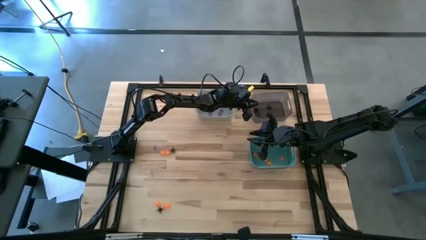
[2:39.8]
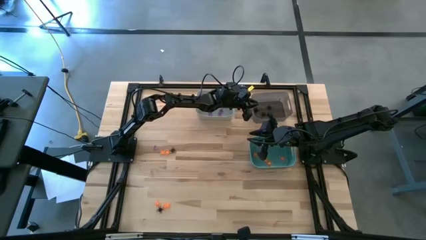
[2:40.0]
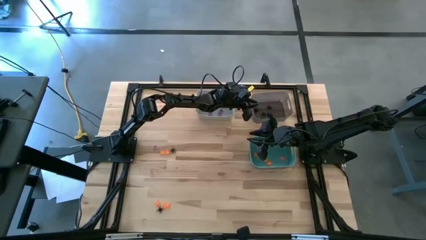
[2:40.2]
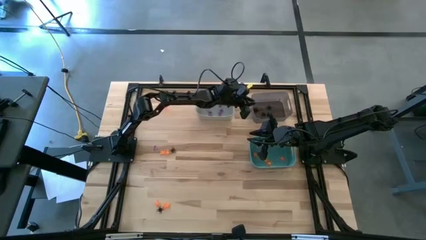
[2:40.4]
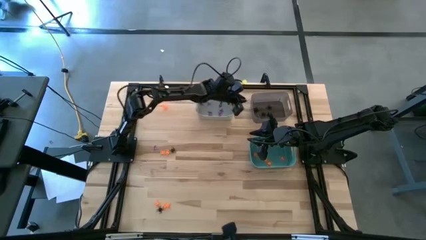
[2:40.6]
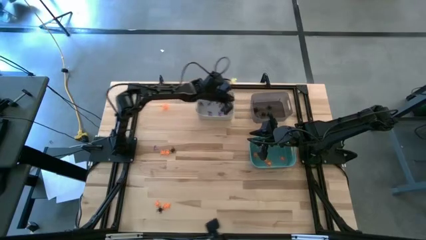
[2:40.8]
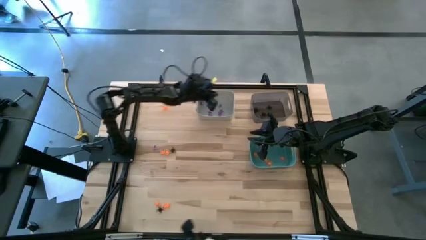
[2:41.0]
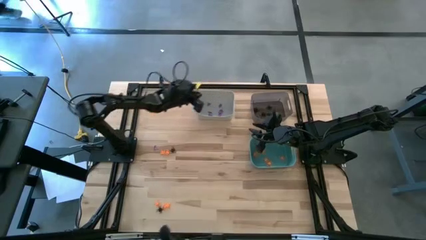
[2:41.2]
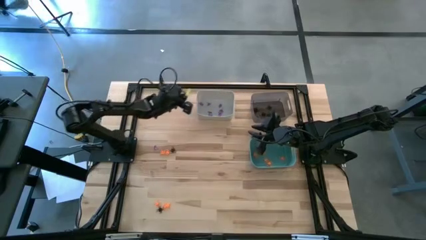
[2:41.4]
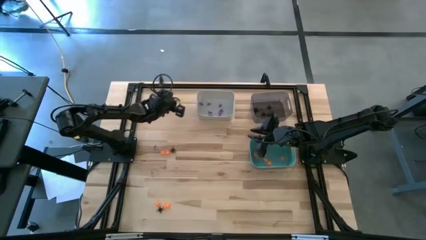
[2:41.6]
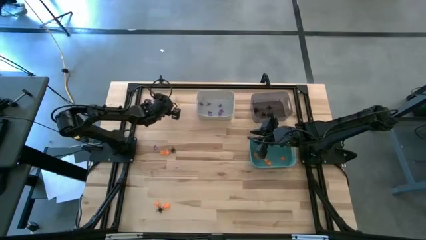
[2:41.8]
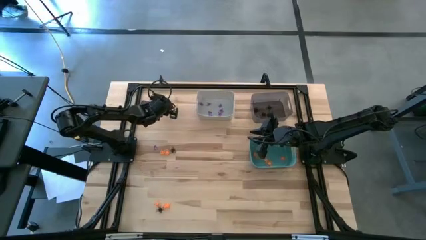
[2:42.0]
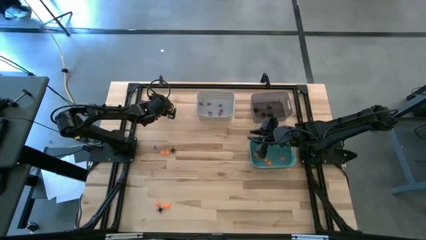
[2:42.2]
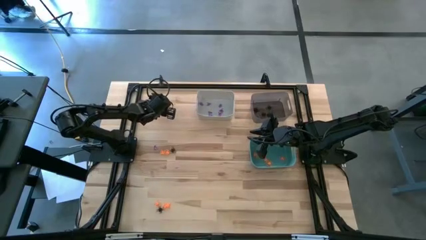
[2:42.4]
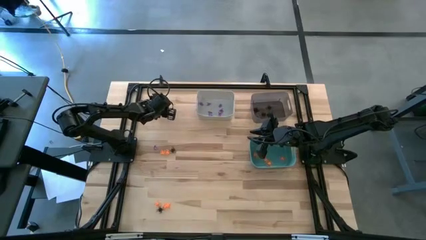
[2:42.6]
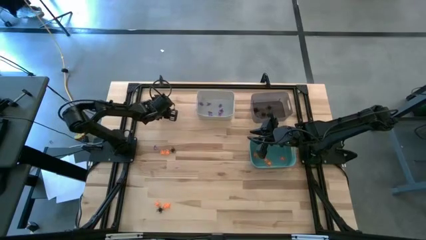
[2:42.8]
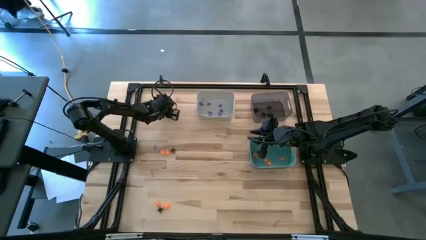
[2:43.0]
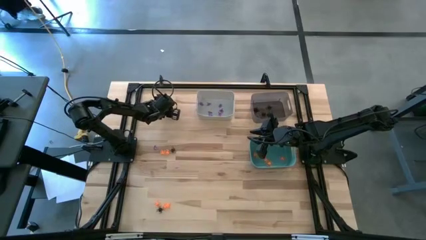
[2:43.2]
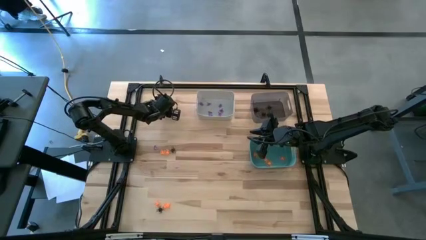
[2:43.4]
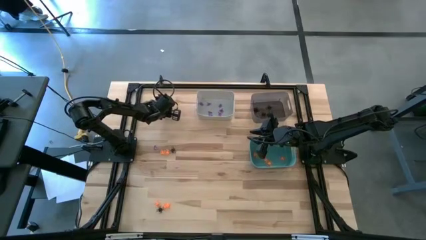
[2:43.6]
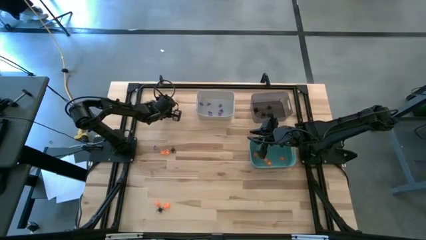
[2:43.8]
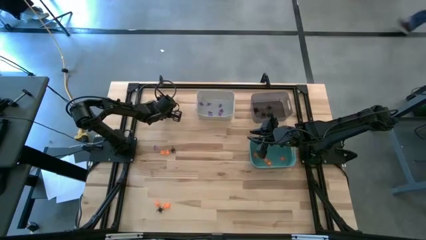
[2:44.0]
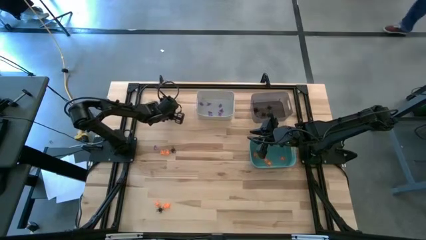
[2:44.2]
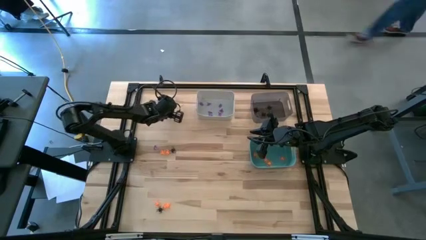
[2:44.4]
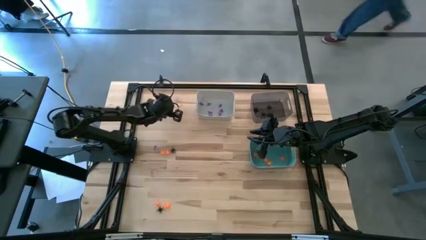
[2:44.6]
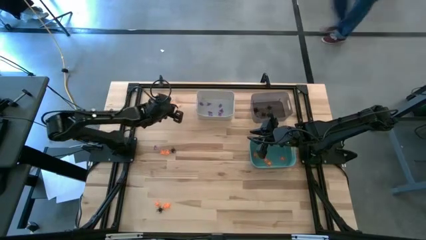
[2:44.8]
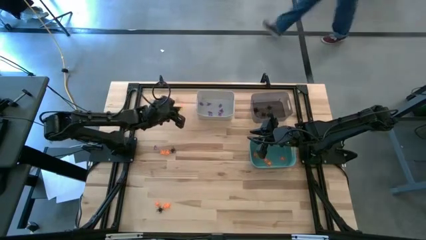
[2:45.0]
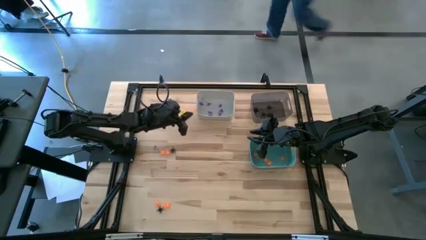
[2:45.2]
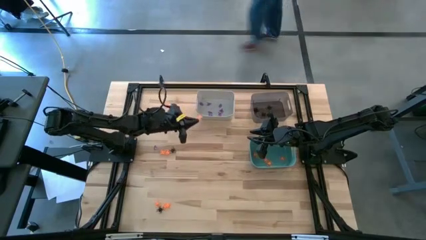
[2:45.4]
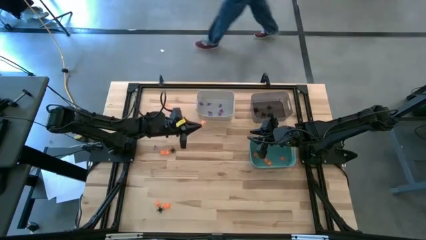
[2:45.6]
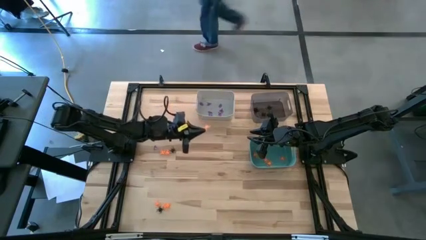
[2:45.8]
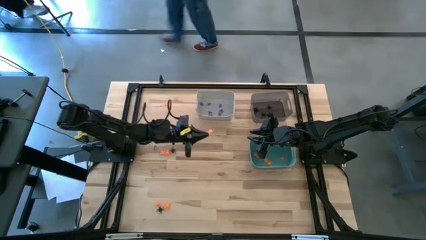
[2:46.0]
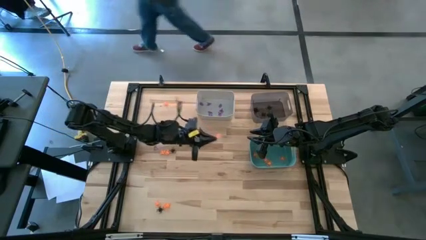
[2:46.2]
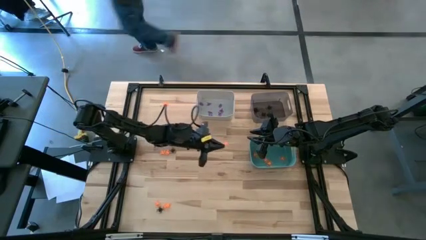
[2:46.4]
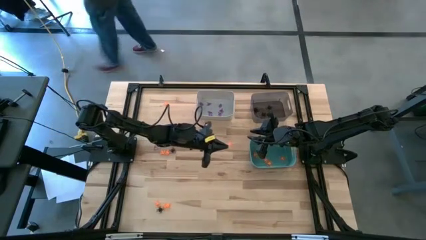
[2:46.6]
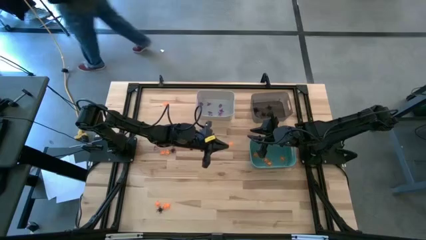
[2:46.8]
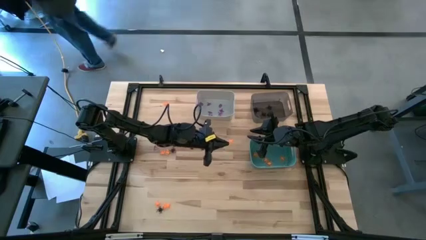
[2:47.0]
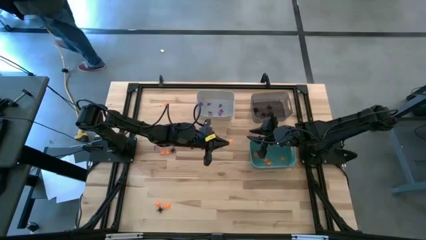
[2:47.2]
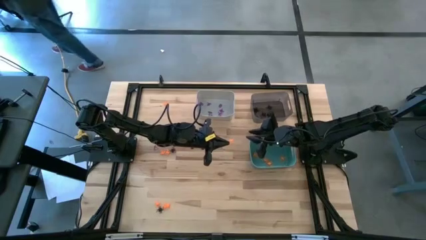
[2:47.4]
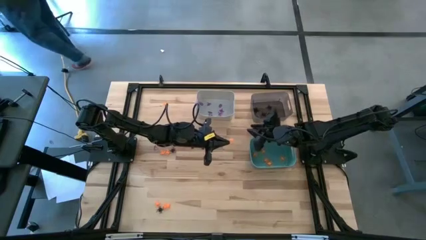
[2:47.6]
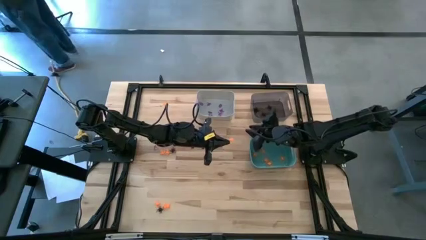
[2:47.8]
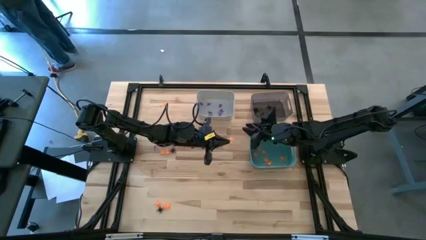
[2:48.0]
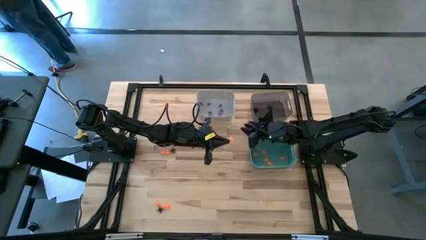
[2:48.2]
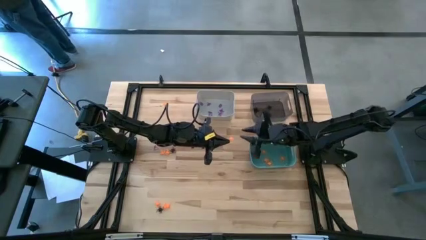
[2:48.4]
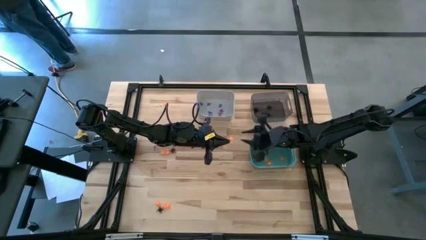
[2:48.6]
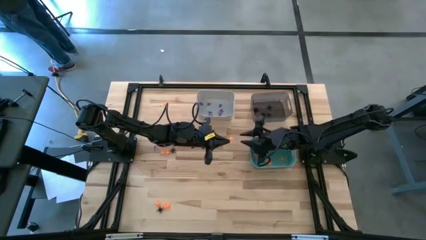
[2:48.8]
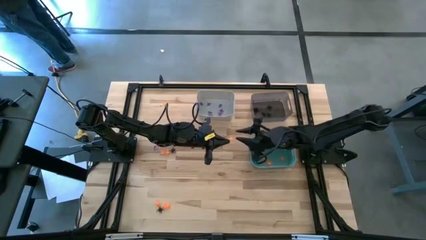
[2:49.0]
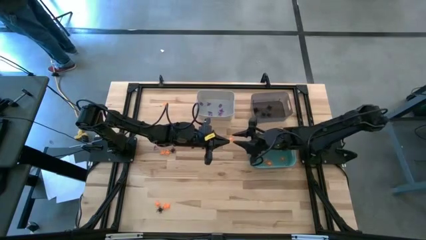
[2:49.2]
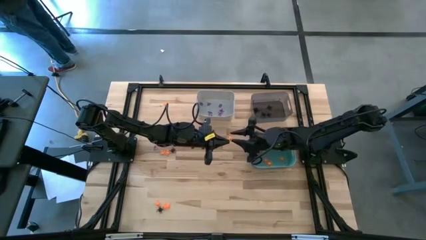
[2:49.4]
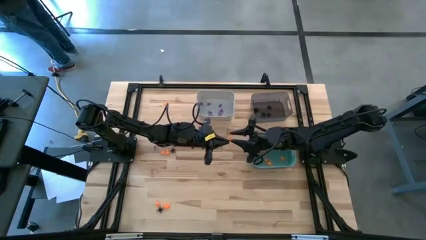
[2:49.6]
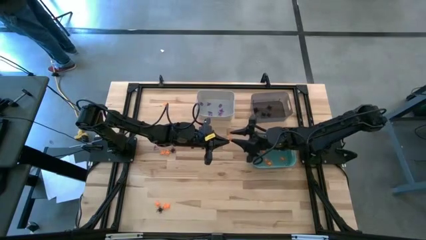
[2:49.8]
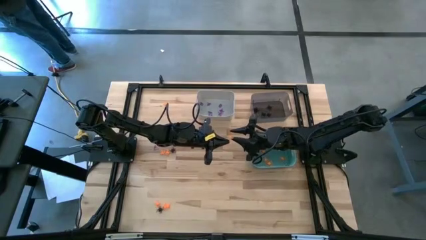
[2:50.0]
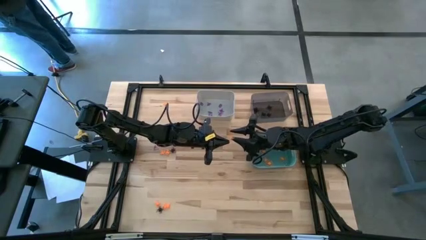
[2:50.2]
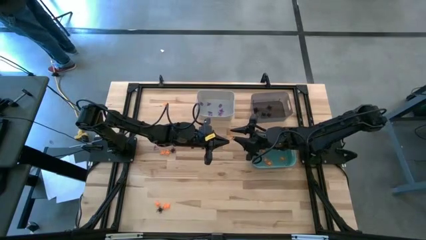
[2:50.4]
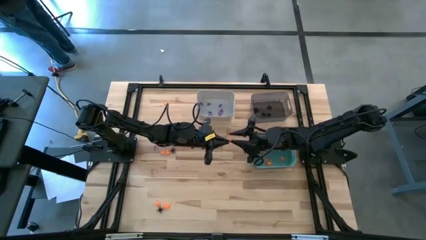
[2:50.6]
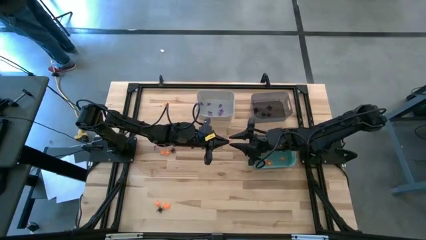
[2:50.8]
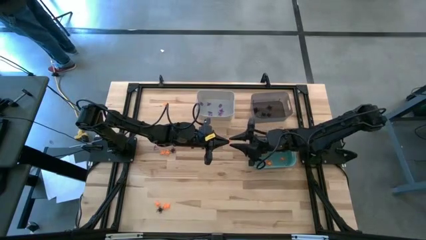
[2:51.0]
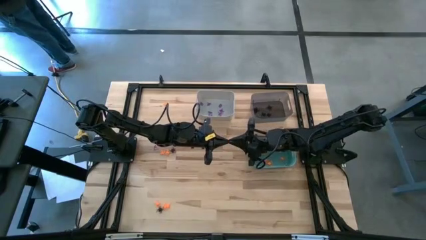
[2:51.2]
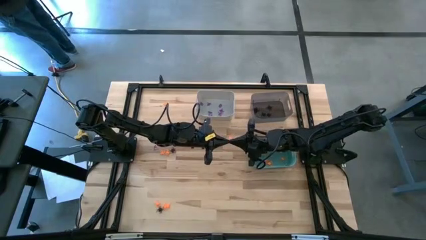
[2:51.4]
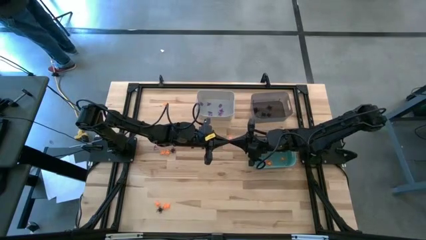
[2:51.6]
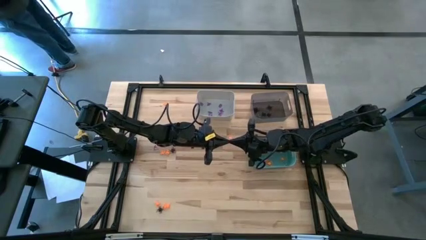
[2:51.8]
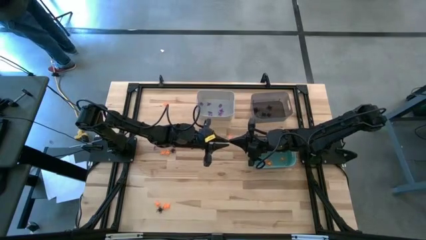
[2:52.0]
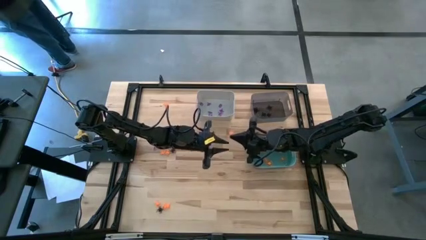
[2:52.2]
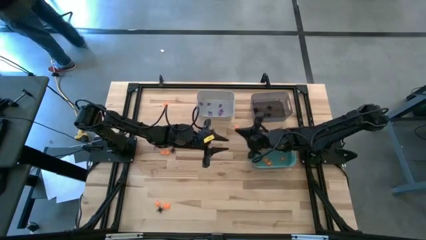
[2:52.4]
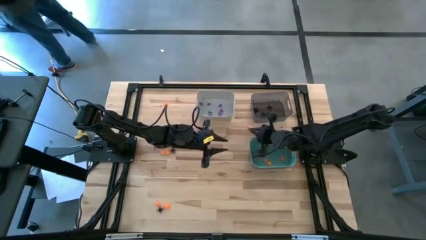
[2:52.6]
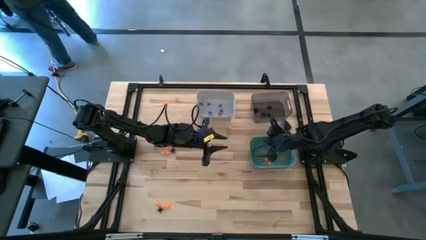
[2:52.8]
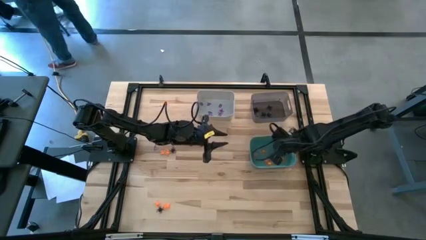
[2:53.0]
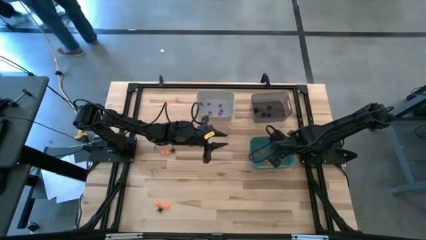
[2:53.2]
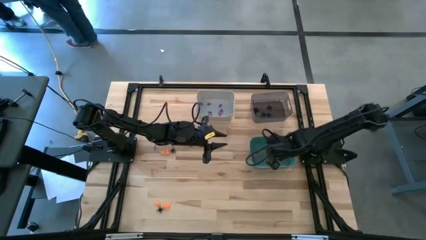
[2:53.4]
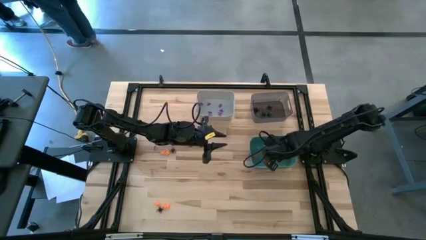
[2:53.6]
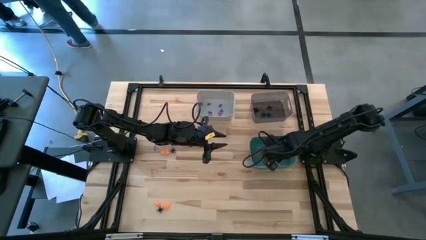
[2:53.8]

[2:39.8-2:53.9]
Task: Sort Halloween decoration
Put the orange spider toy into the green bin

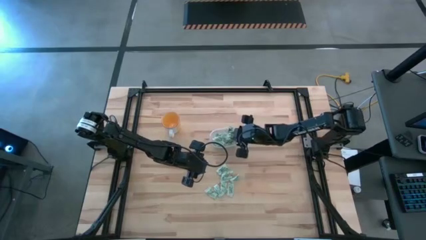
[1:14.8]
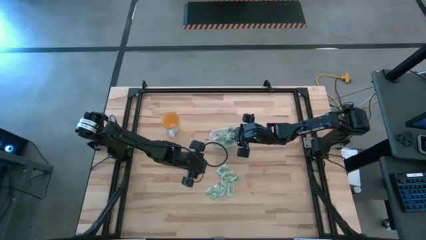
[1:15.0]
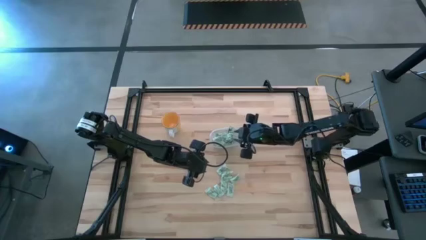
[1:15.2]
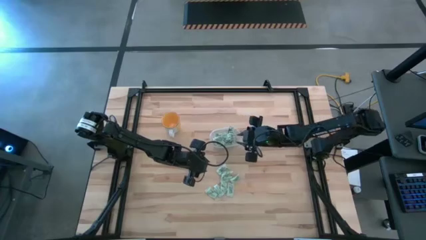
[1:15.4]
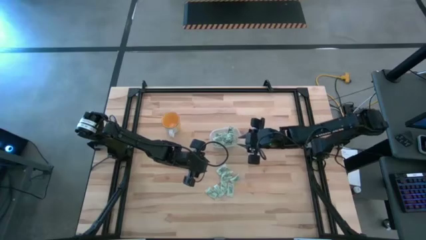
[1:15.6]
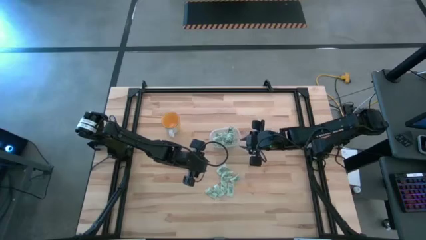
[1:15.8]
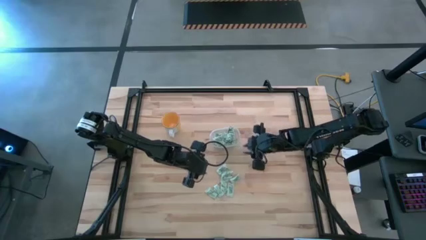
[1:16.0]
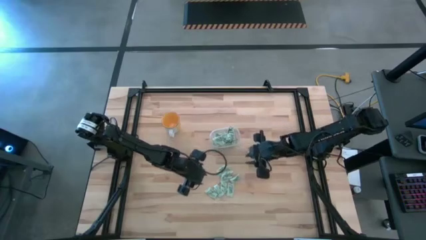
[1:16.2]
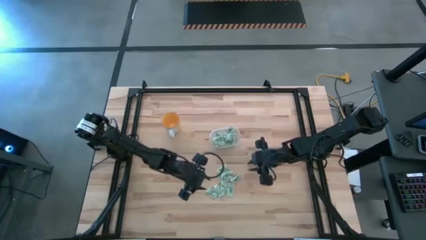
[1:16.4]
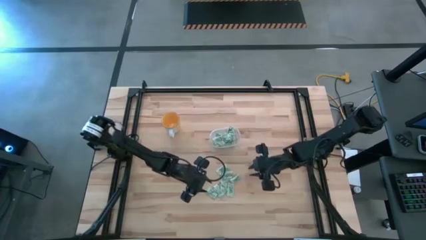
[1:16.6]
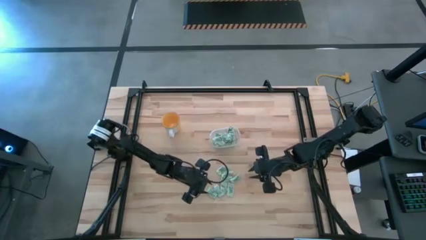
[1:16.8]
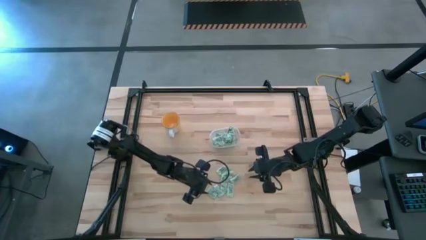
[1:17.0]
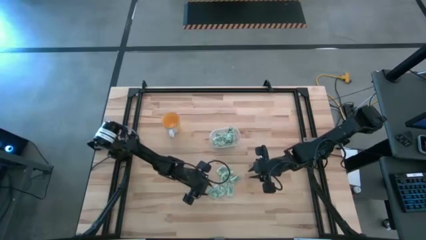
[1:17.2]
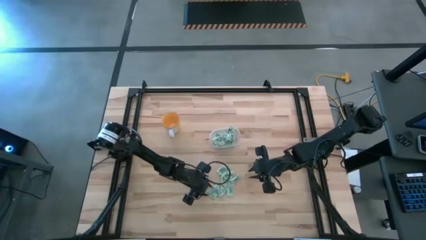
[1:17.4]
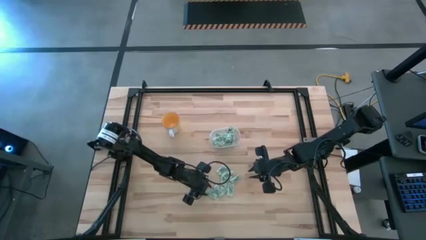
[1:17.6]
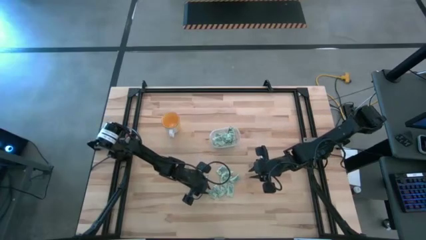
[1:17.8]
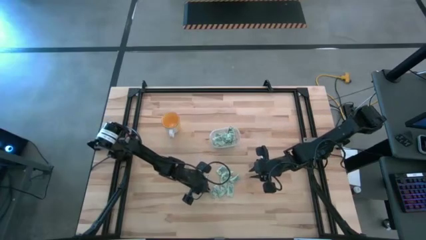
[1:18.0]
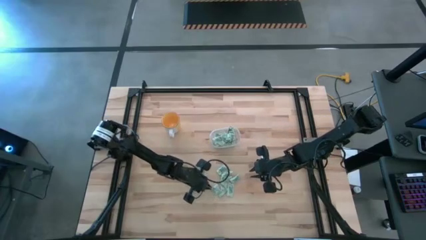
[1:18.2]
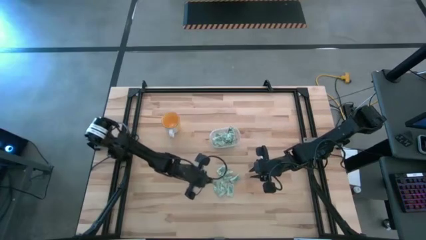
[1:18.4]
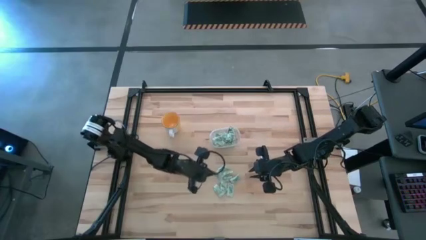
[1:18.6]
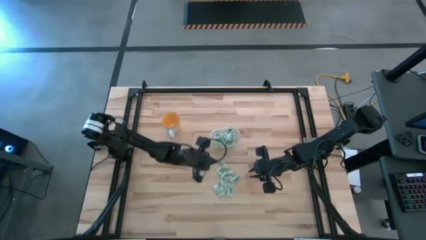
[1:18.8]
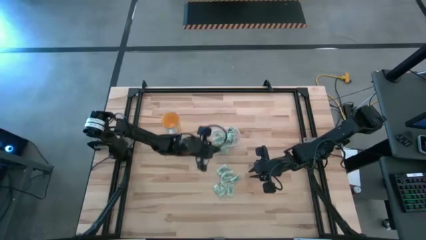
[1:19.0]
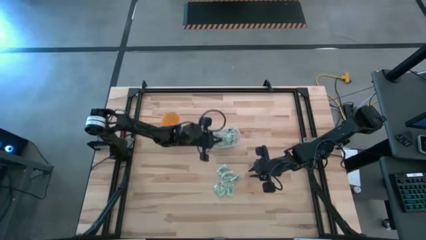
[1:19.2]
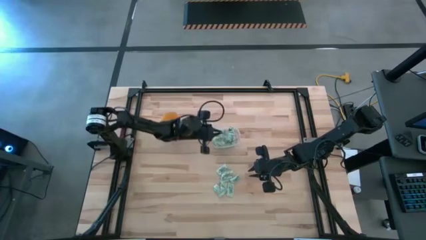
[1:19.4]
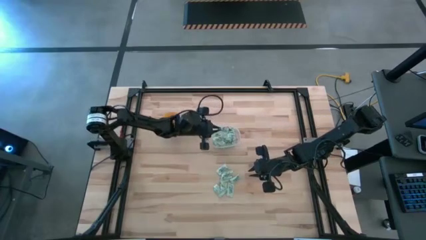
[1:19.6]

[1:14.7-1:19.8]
Task: Pick and place Stevia / Truvia into bins
Put the stevia packet into the transparent bin
